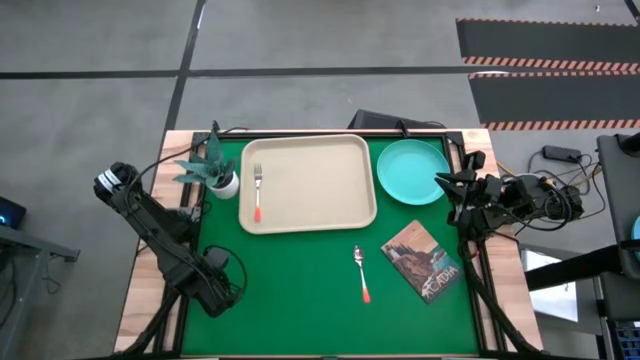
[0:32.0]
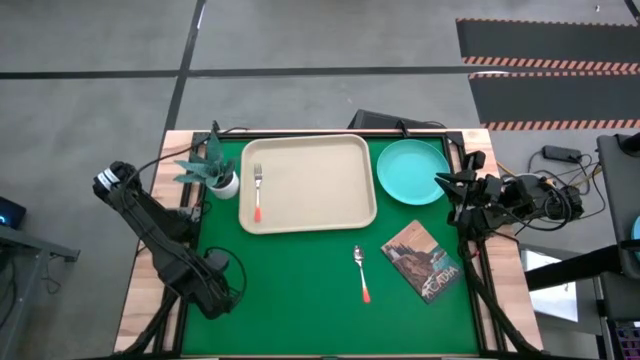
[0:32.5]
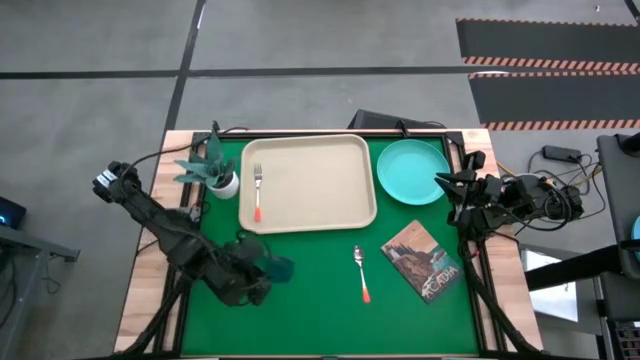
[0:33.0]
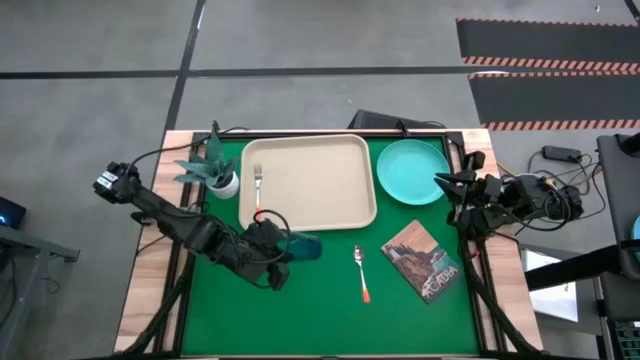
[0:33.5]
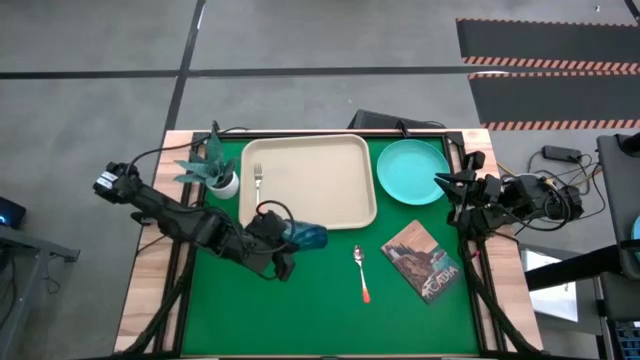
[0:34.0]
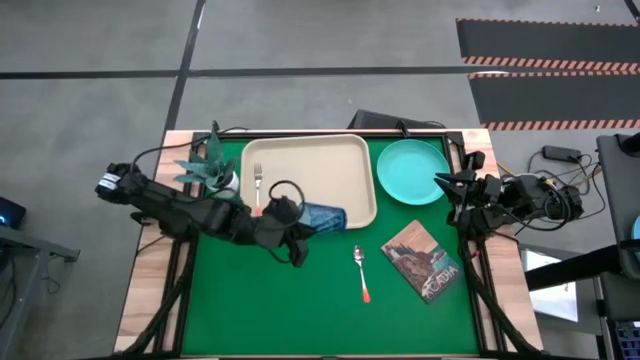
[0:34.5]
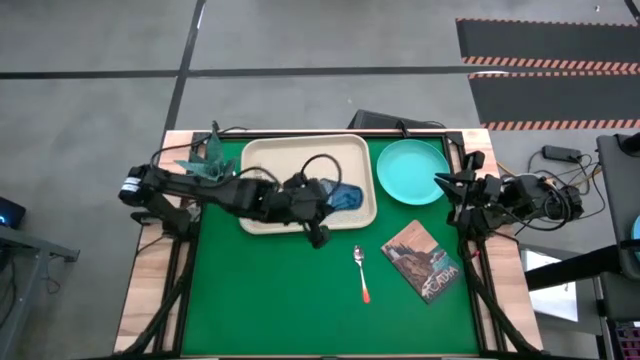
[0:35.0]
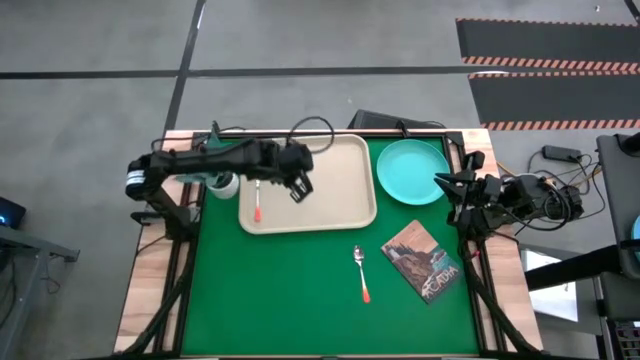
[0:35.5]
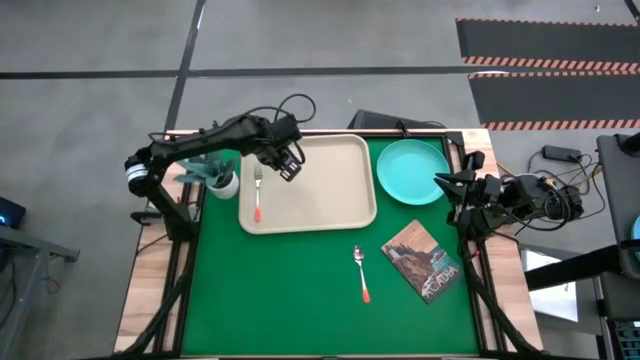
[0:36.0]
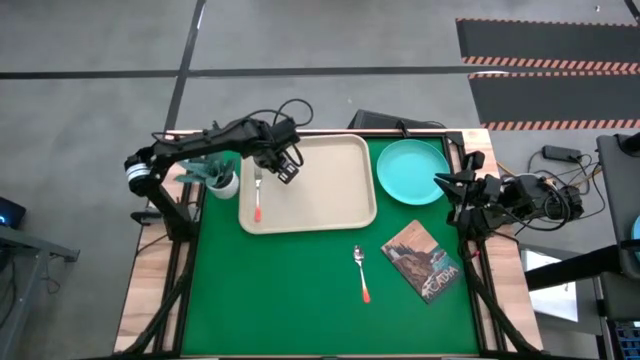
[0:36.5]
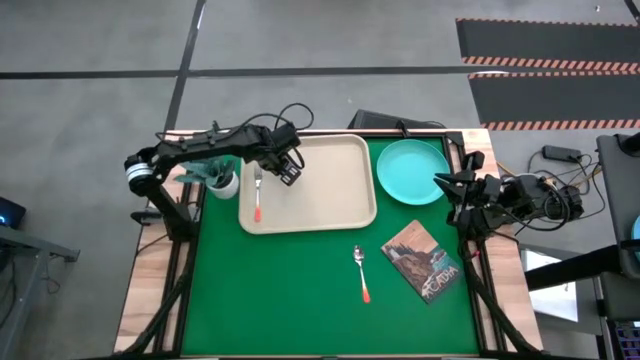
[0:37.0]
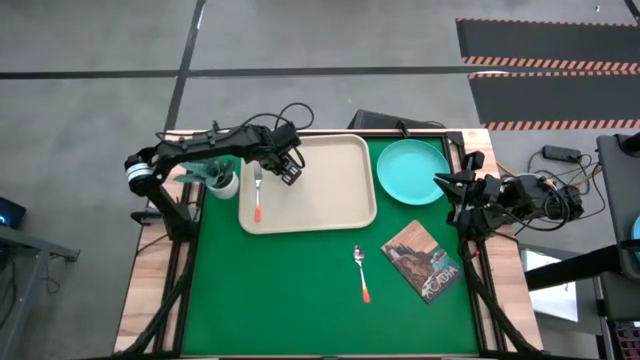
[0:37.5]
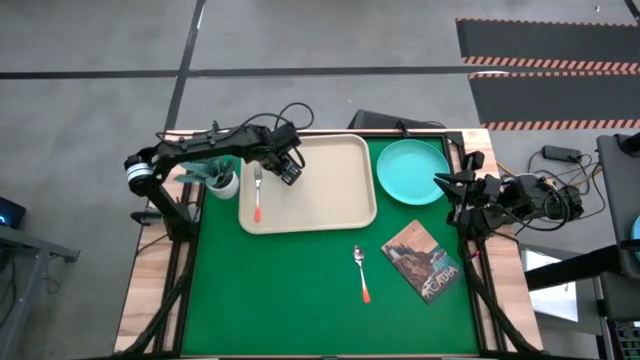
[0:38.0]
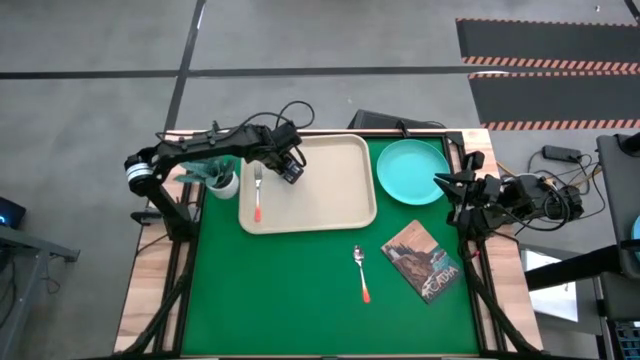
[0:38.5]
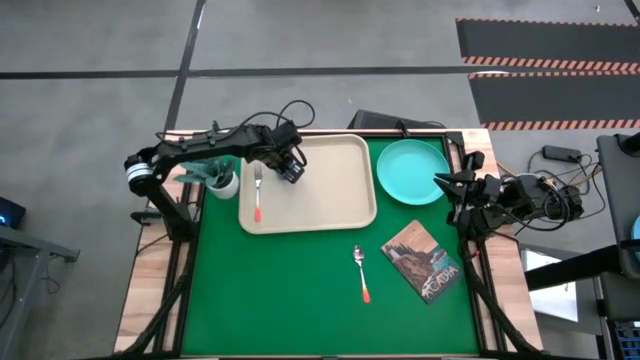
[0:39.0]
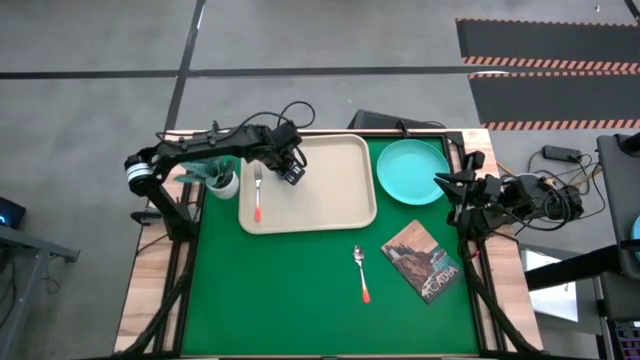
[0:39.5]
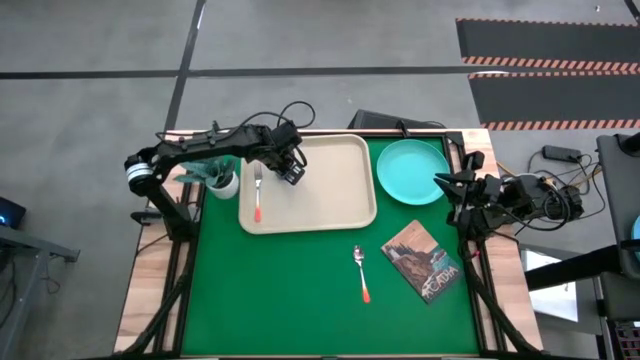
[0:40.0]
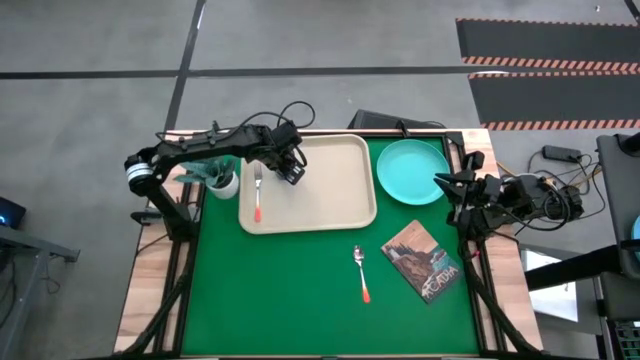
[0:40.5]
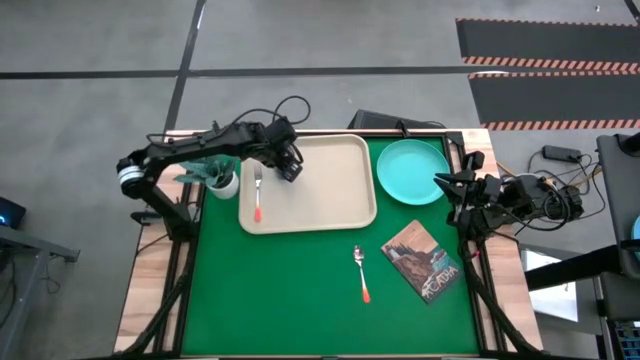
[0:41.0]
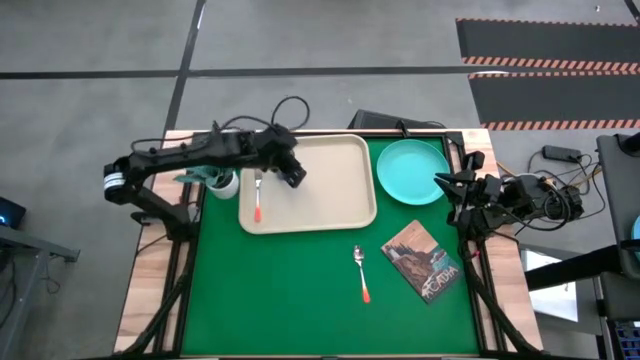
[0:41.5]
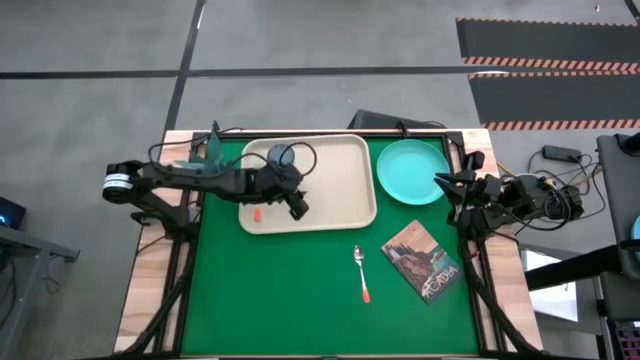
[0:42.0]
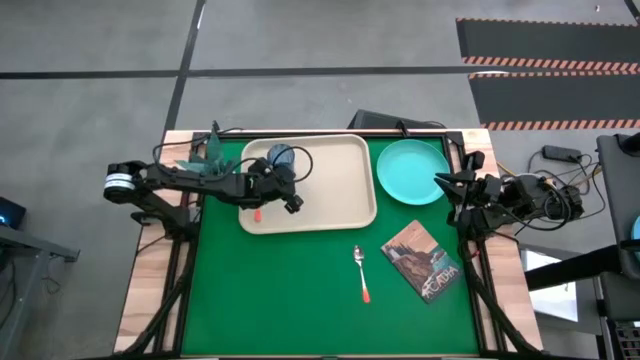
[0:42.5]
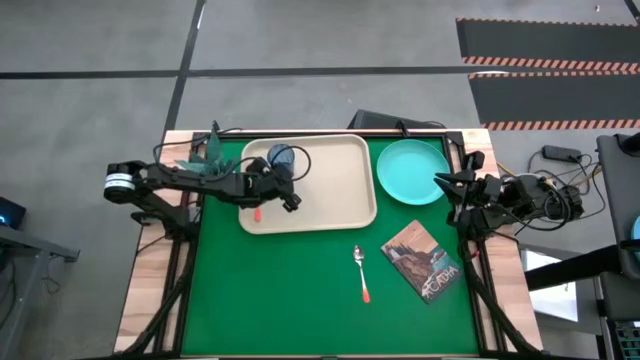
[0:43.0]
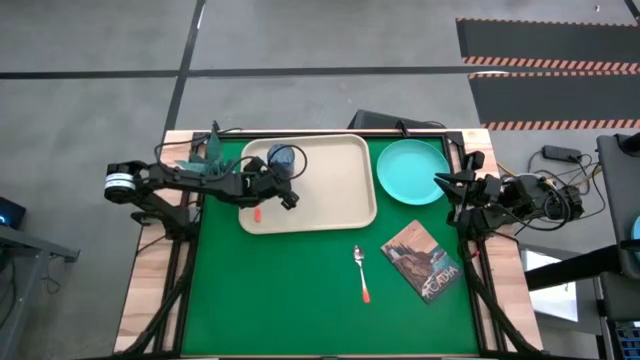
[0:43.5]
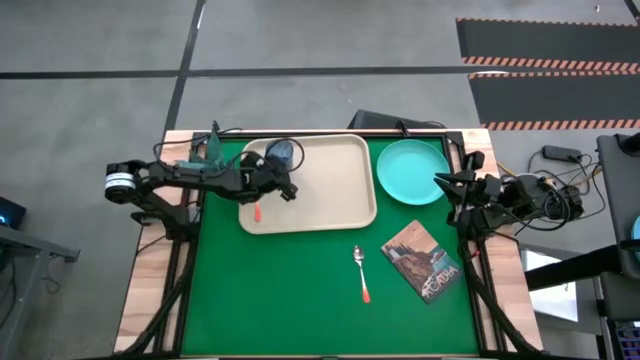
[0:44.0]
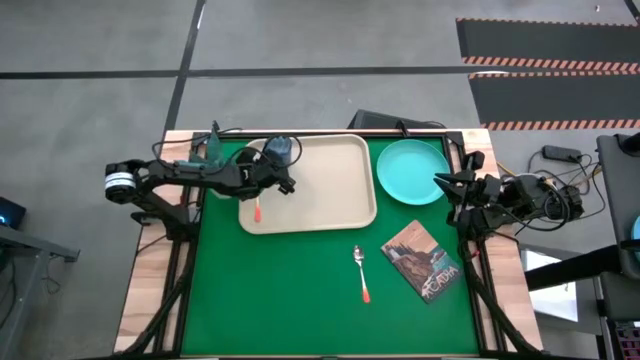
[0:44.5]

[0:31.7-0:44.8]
Task: Pick and place plate/cup/fork/spoon on tray
Put the blue cup on the white tray

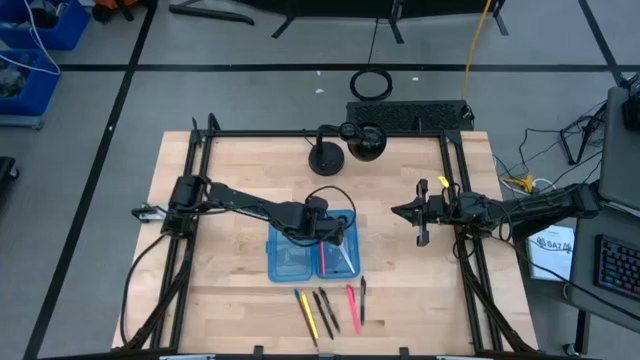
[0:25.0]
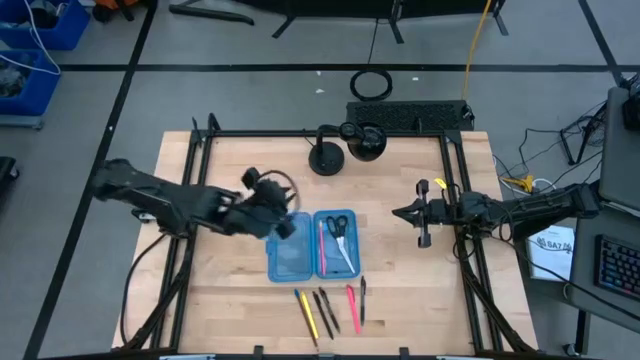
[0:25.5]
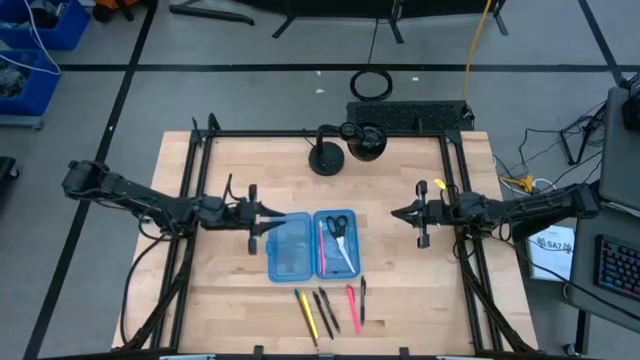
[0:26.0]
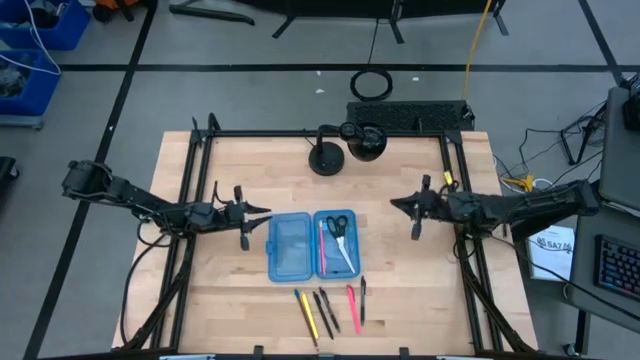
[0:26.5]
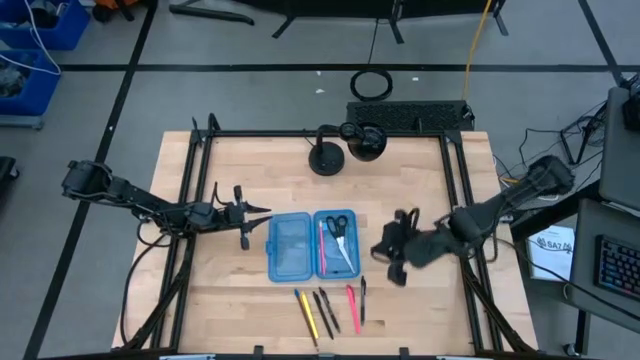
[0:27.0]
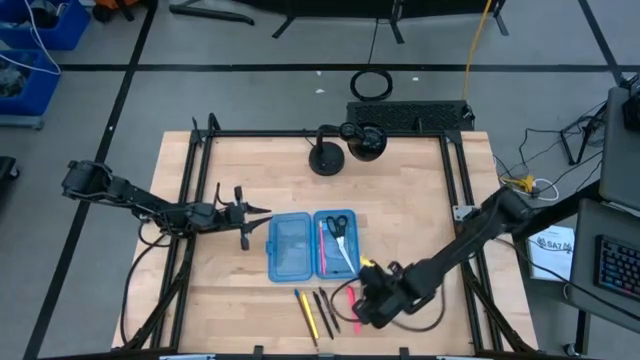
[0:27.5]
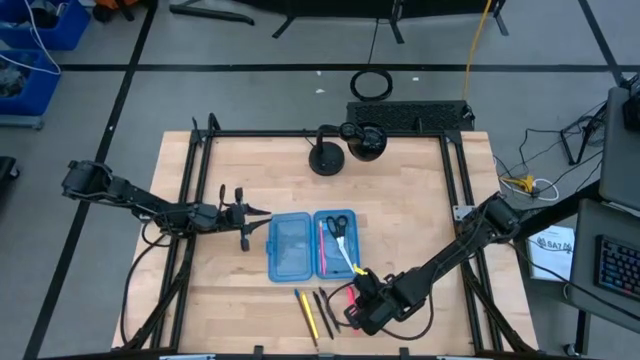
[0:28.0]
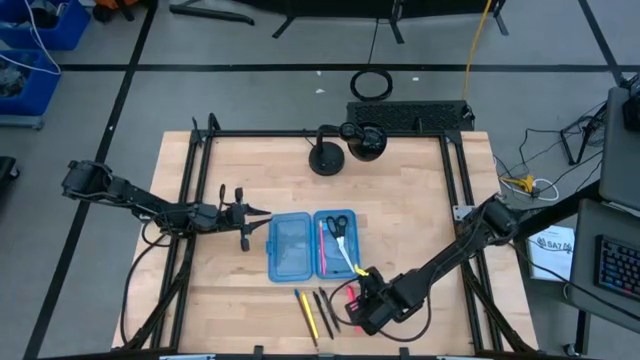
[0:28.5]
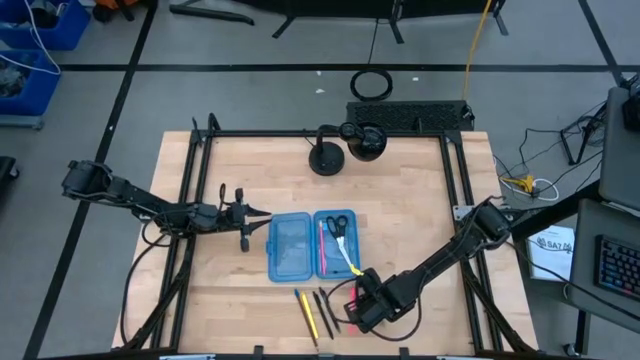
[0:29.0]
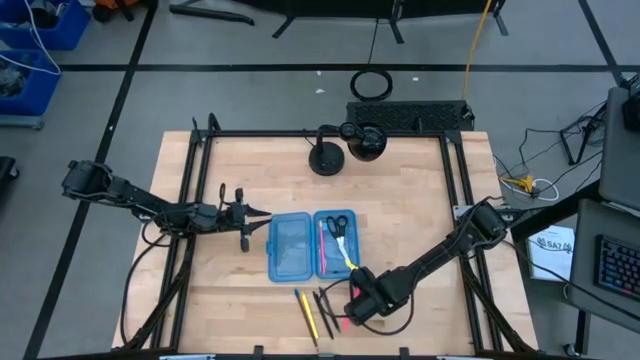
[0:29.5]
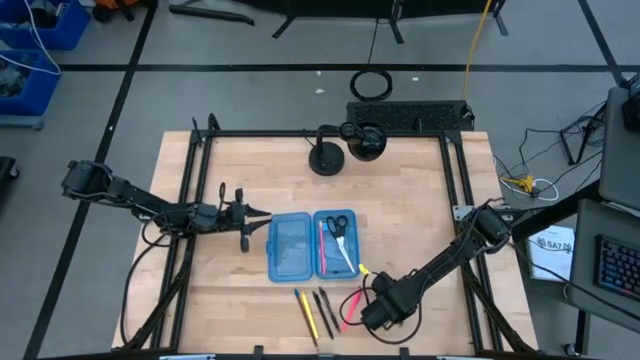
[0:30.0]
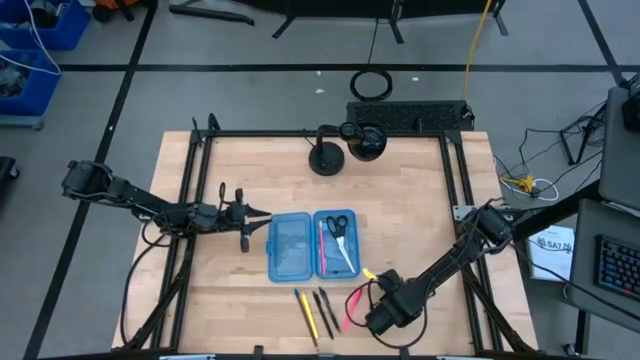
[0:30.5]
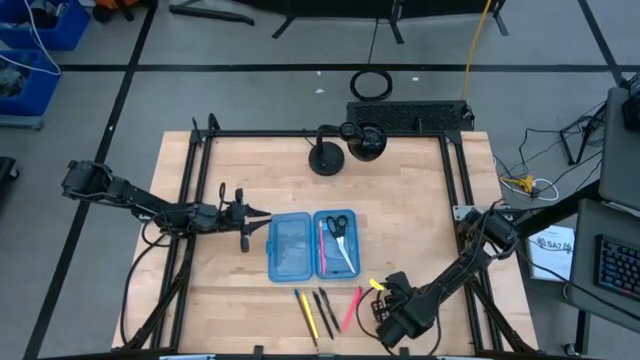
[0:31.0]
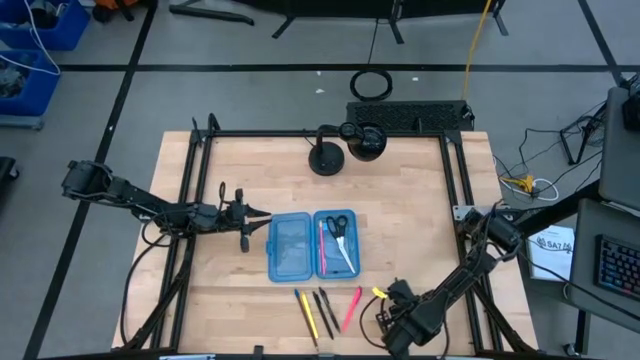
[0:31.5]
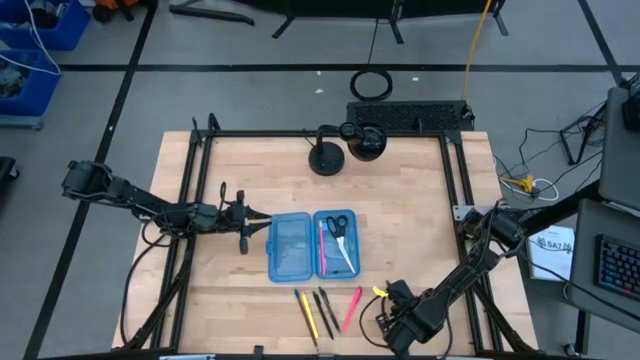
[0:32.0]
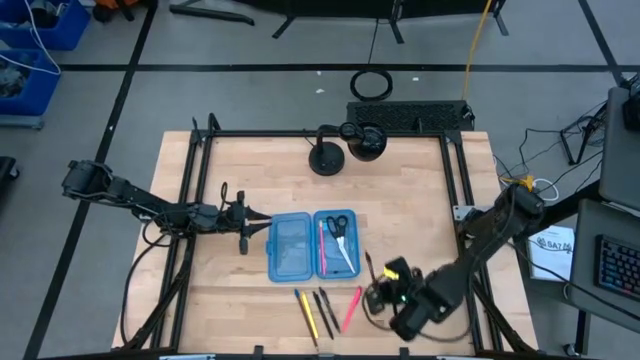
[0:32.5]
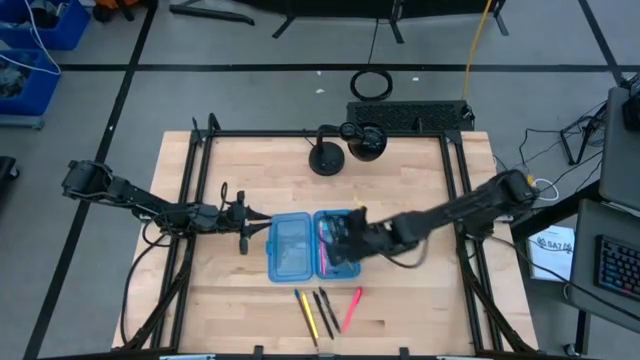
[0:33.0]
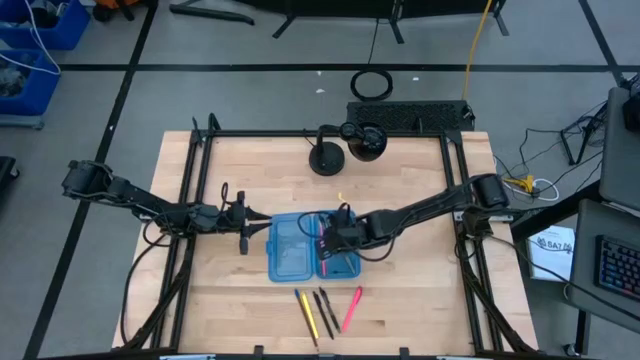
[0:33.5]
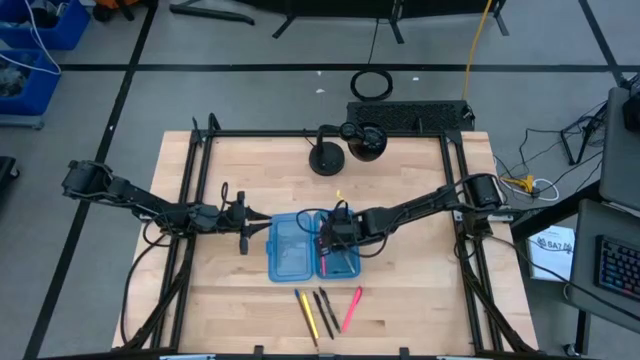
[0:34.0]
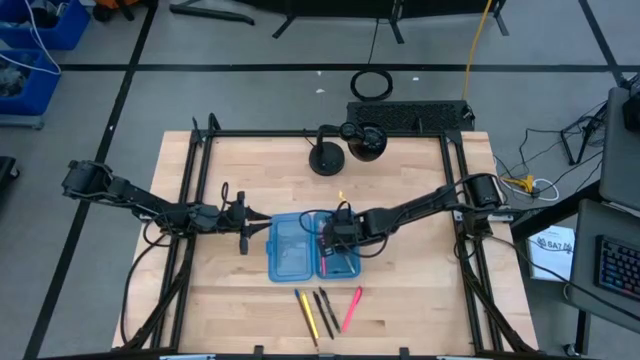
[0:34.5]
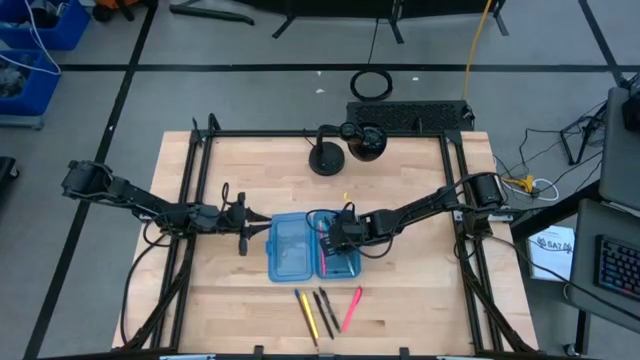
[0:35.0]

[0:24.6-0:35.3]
Task: Pick & place school supplies into a supply box
Put the right black pen into the blue supply box
